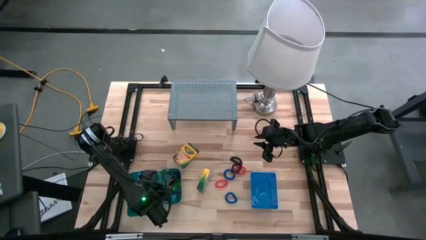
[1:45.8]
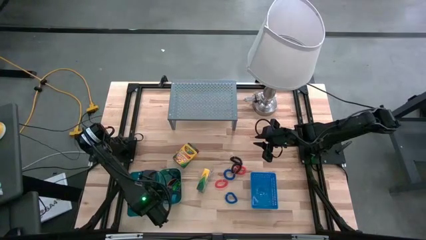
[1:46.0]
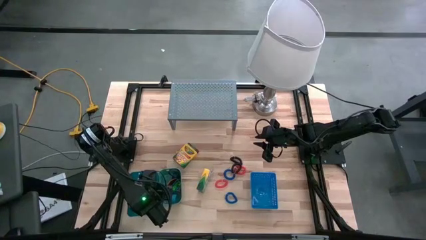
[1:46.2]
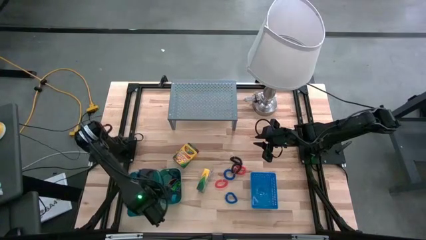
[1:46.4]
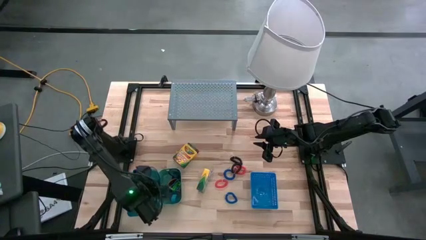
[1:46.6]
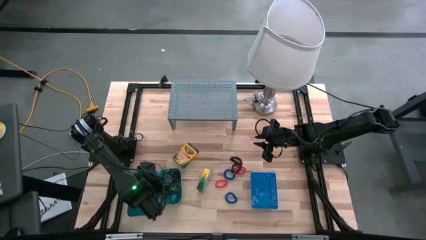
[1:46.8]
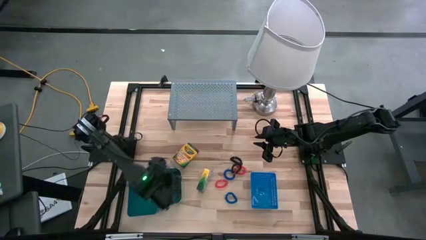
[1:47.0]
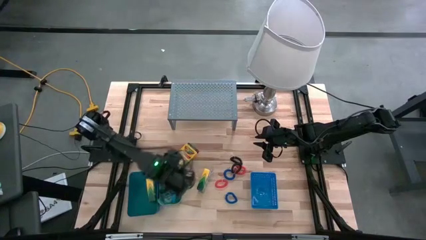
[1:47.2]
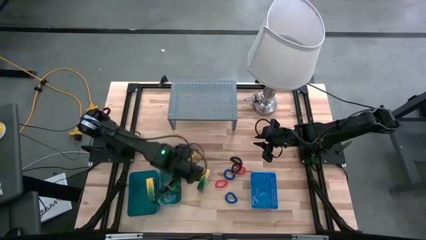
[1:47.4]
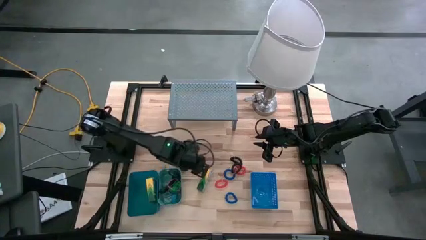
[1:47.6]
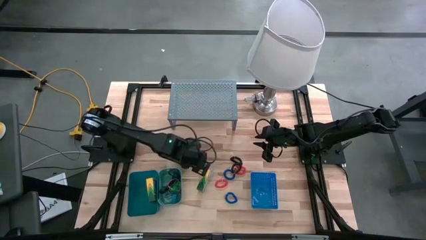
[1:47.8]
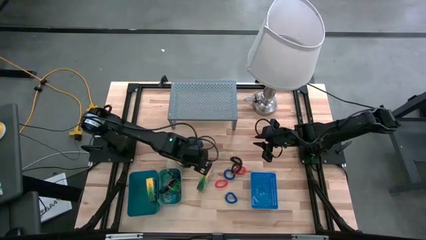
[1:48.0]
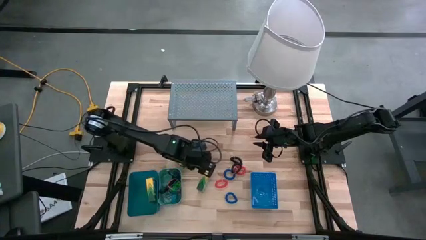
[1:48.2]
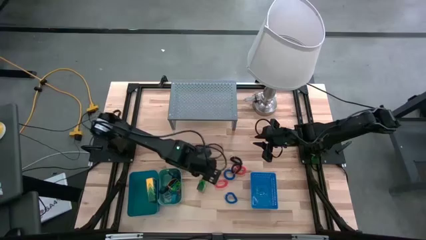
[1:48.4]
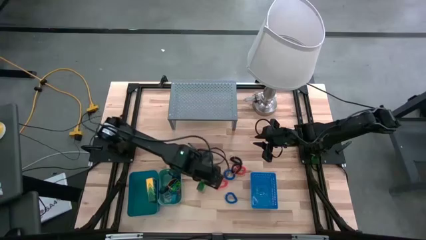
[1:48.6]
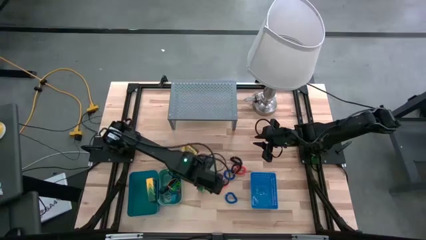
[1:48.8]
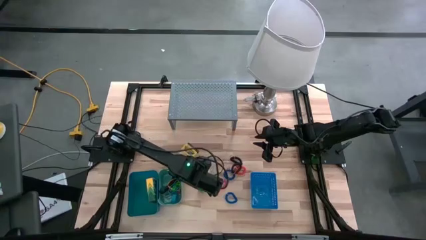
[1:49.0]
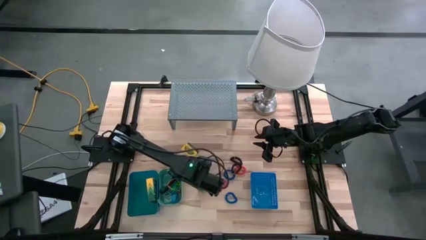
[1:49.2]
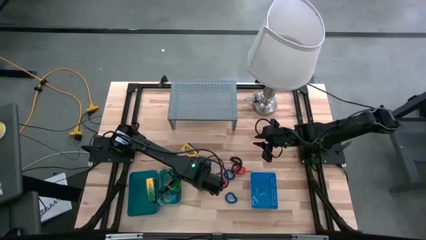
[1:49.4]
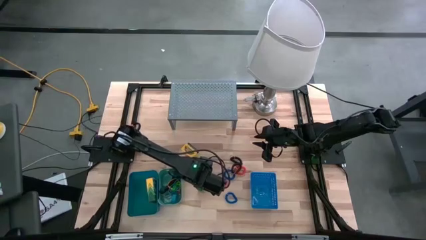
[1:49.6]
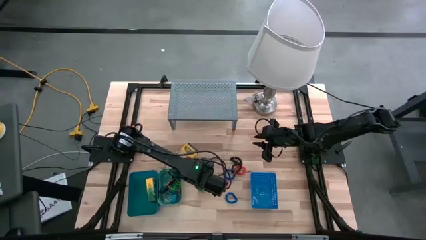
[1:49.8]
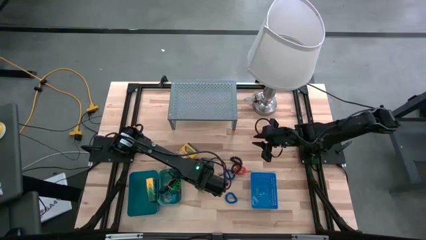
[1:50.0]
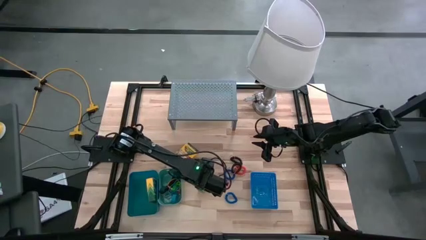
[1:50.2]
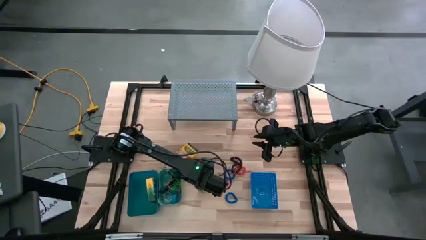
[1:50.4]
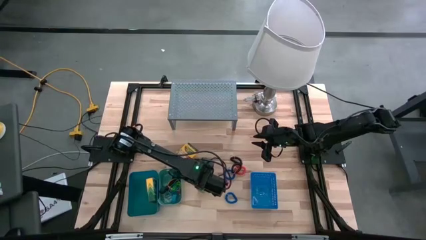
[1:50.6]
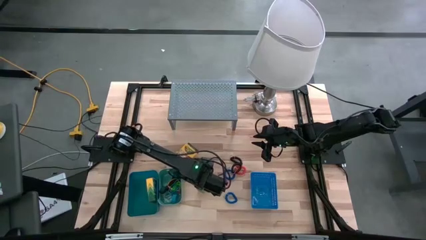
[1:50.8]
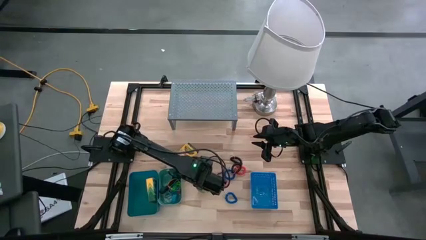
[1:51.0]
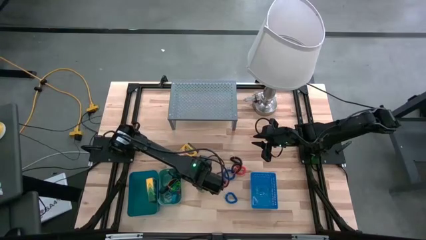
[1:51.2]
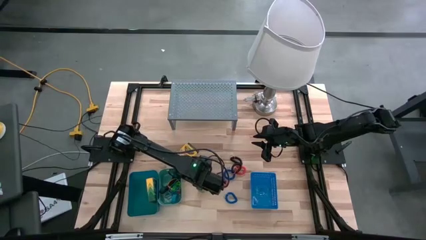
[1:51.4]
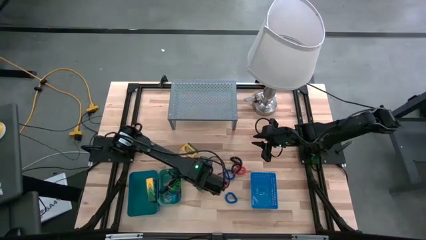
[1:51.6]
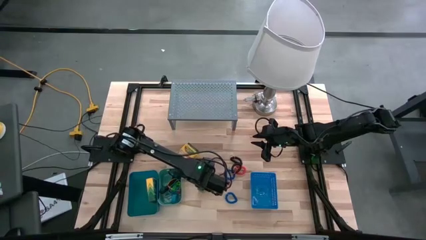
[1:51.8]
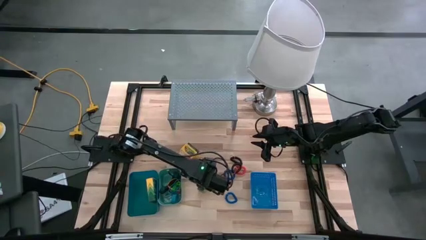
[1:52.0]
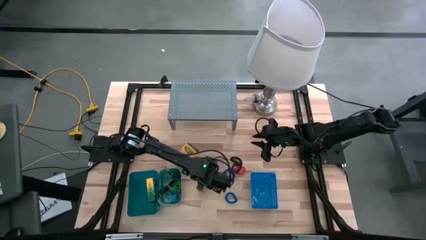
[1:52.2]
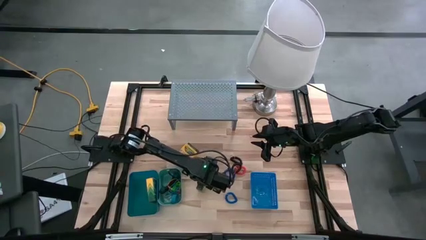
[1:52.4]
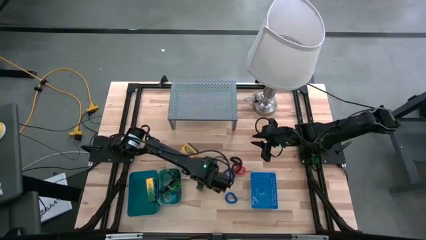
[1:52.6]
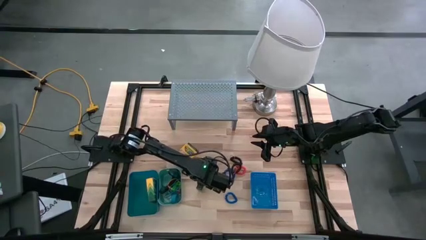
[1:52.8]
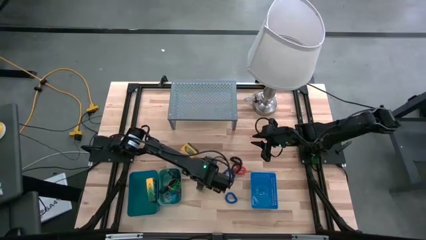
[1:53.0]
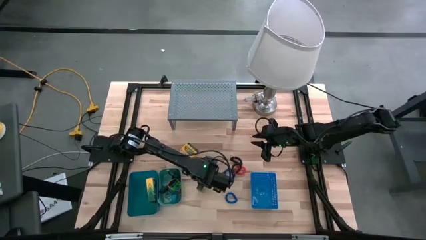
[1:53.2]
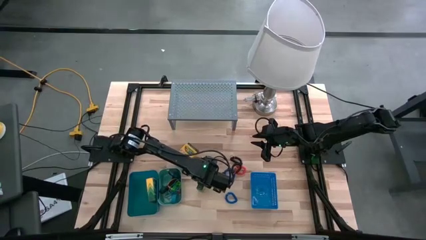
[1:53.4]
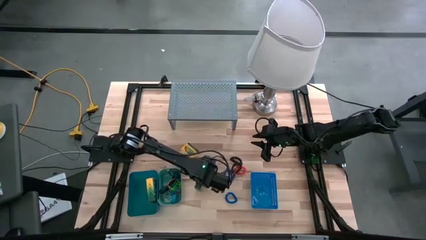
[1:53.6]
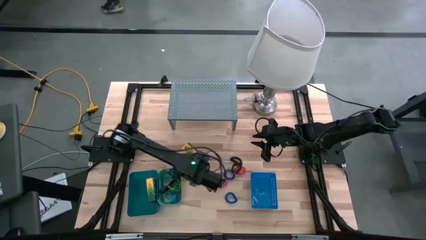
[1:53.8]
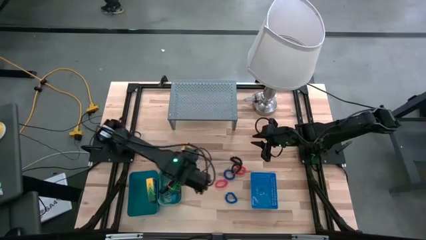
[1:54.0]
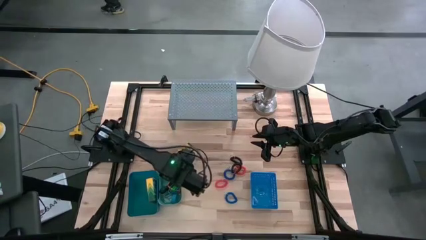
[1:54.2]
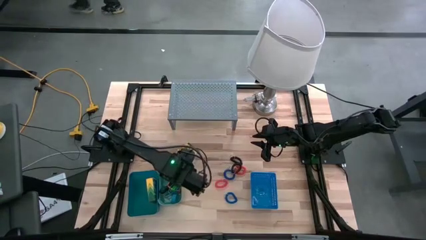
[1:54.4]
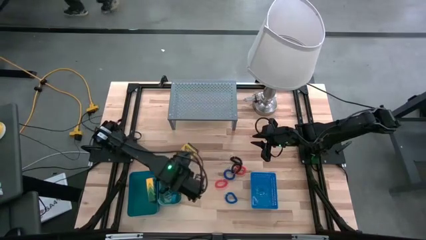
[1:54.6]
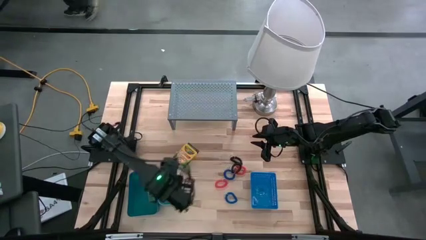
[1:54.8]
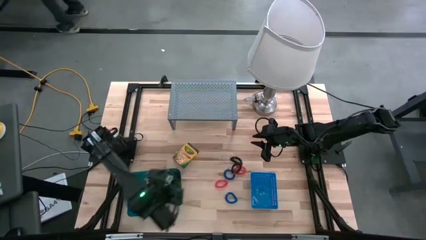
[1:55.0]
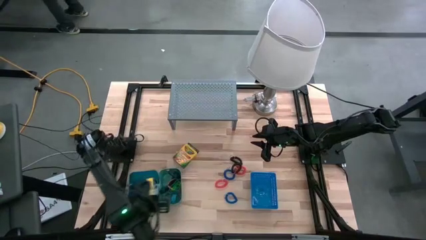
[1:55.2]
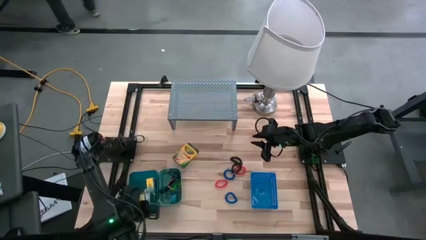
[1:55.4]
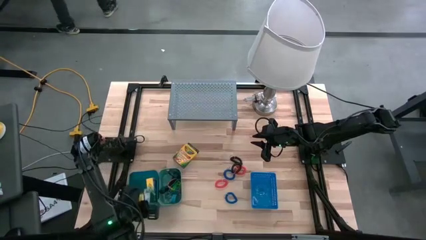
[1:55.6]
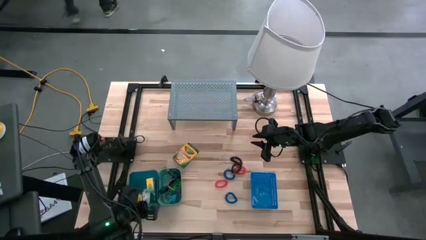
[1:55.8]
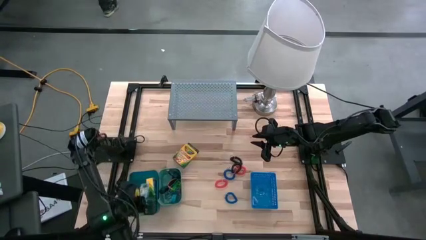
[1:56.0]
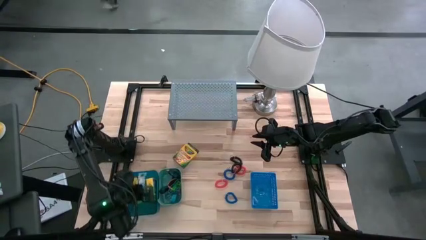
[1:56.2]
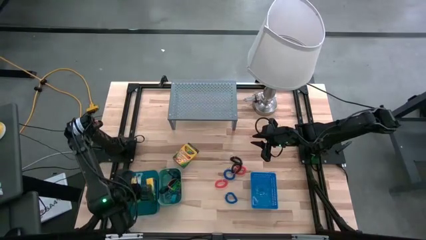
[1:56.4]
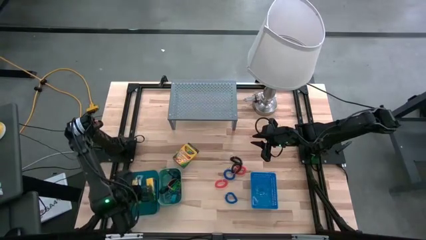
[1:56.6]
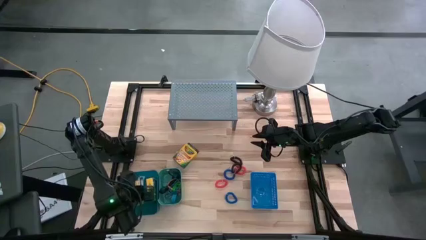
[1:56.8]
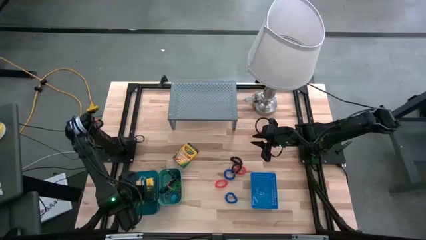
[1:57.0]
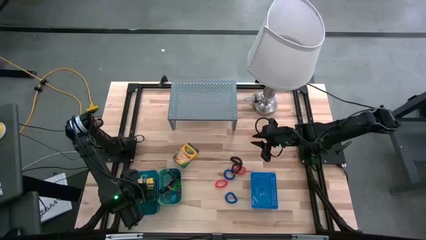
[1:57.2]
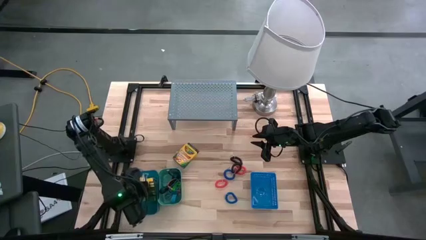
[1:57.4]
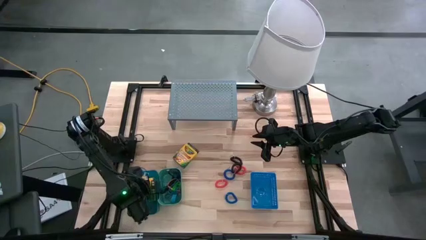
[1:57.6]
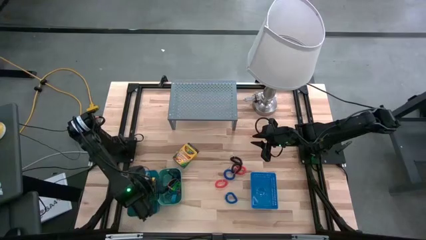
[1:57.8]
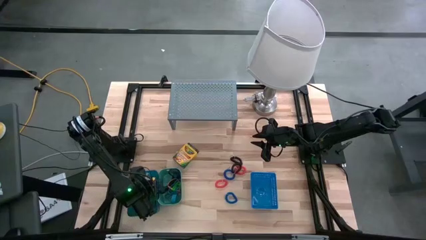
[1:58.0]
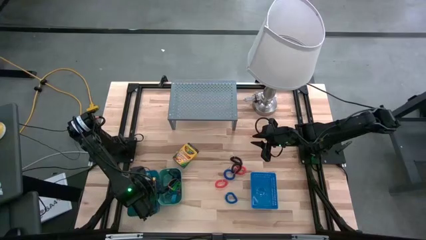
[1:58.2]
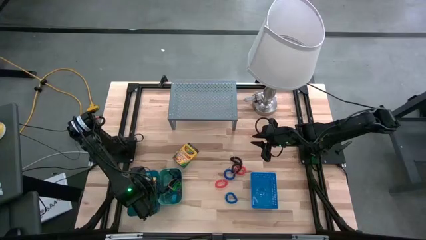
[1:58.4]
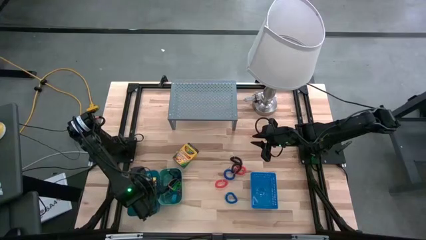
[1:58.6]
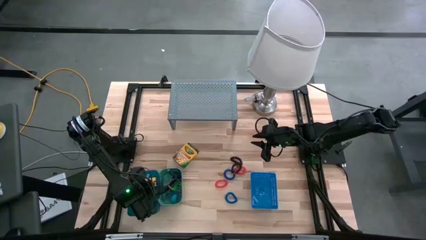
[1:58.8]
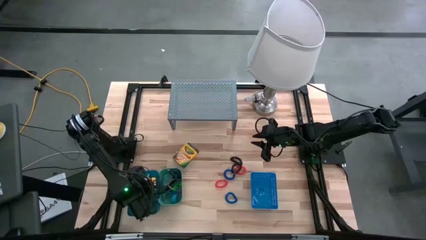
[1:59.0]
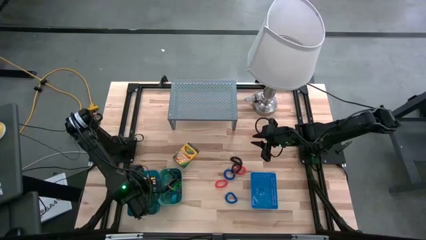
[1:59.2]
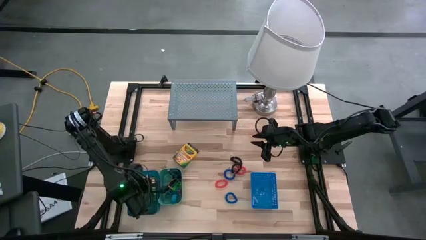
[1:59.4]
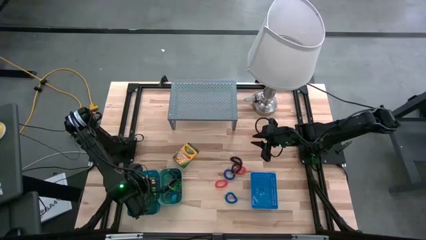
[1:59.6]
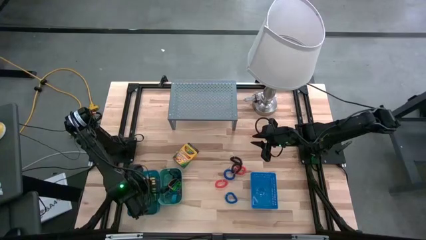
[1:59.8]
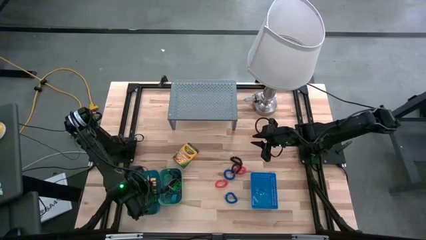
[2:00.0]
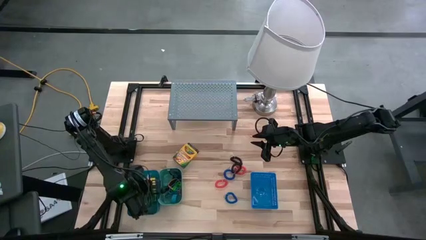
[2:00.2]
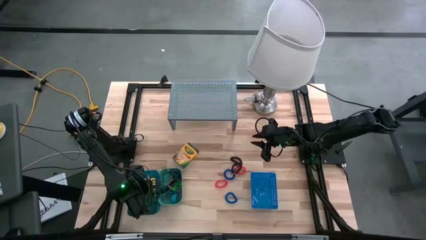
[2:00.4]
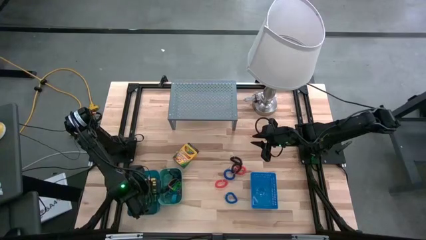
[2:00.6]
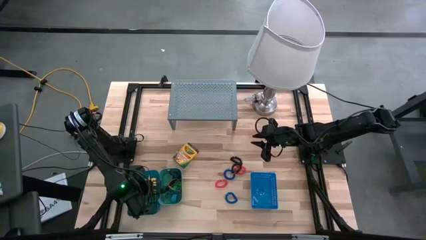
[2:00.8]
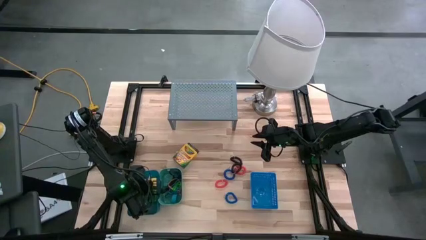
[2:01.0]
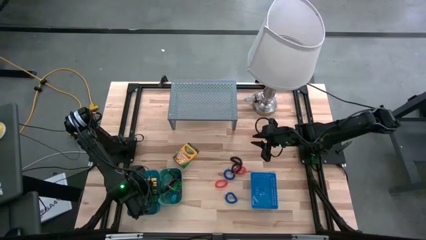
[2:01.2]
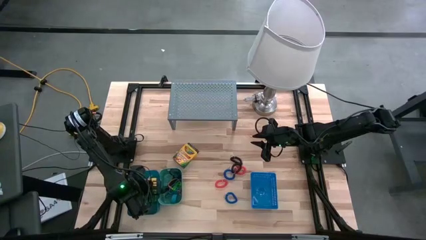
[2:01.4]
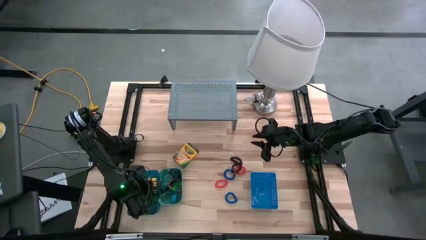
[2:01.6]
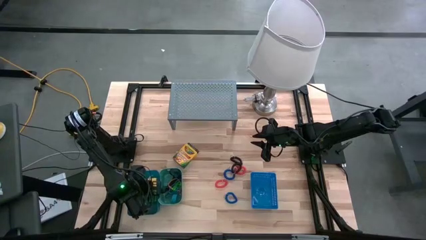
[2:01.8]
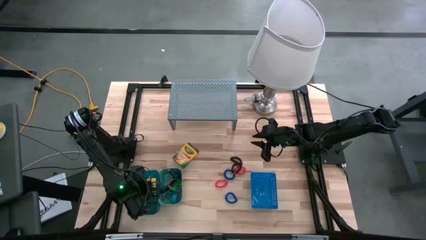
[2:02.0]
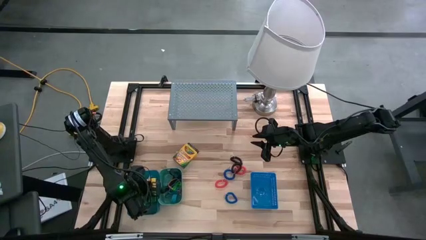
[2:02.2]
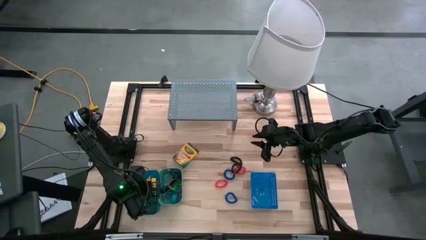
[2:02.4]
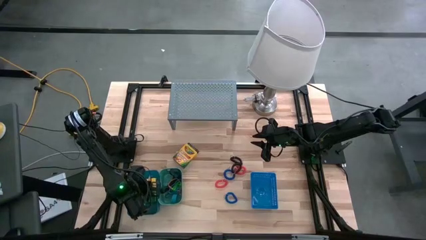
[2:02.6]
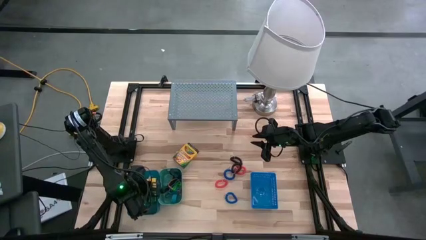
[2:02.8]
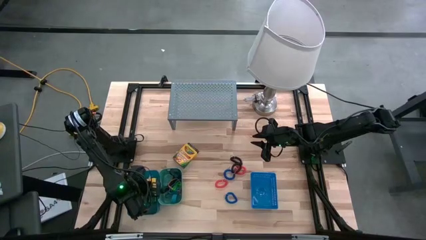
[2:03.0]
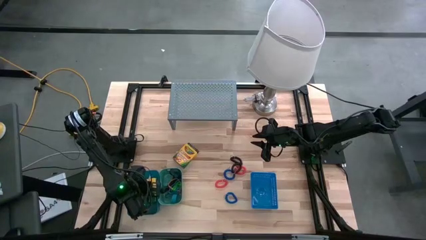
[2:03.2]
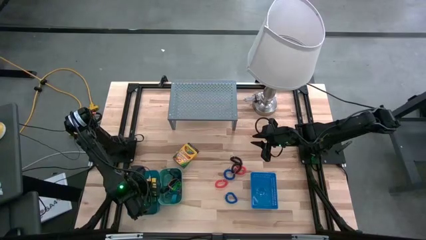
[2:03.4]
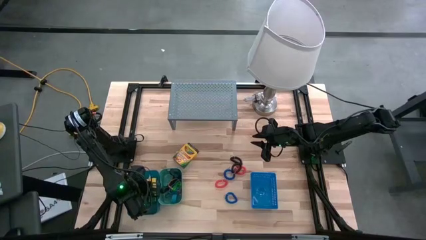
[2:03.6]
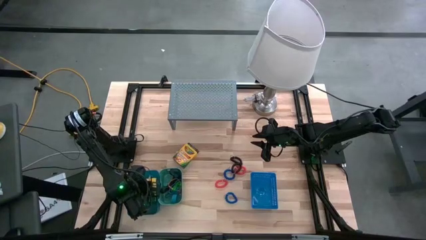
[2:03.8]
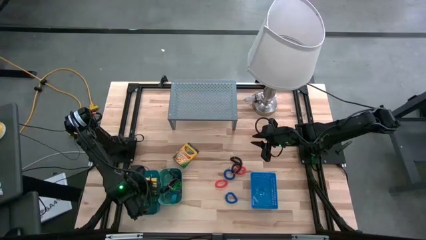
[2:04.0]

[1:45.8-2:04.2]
Task: Pick & Place Office Desk Supplies
Put the bottom box of crayons into the light blue bin
